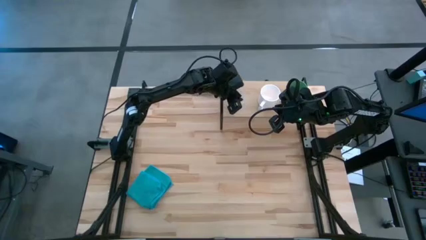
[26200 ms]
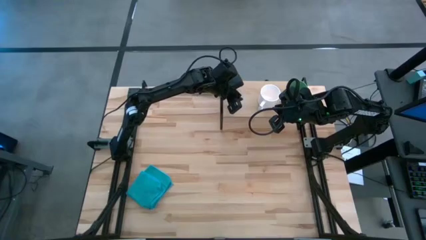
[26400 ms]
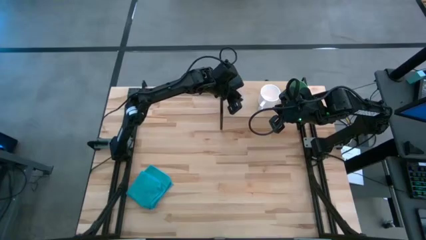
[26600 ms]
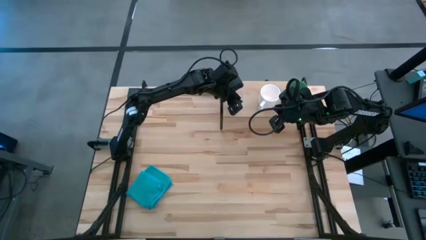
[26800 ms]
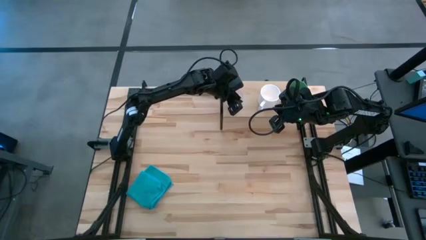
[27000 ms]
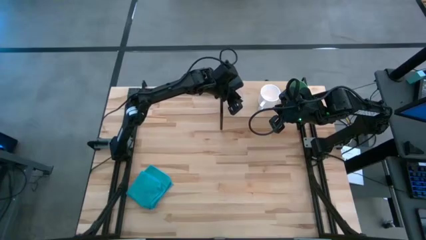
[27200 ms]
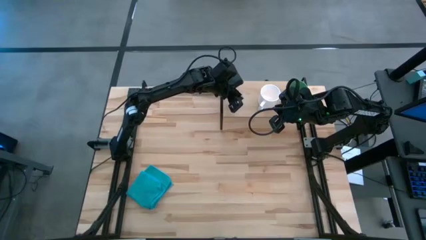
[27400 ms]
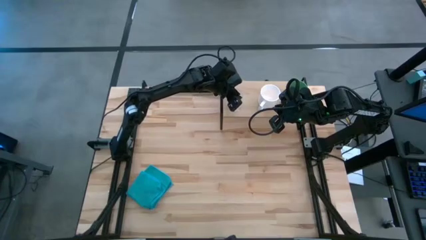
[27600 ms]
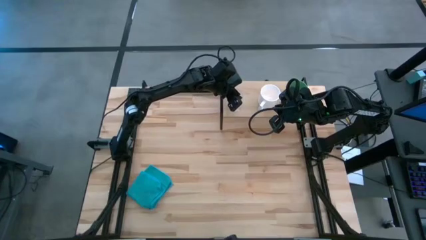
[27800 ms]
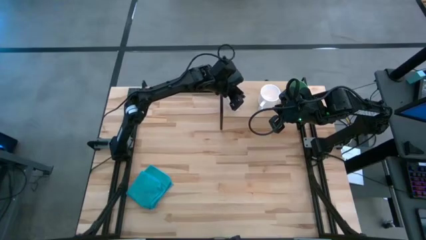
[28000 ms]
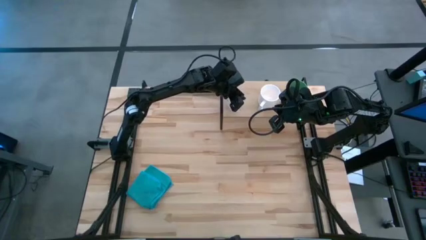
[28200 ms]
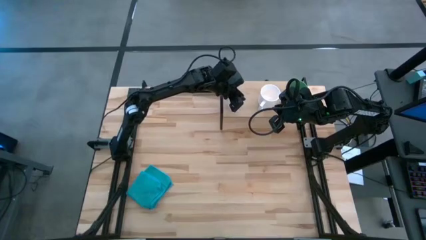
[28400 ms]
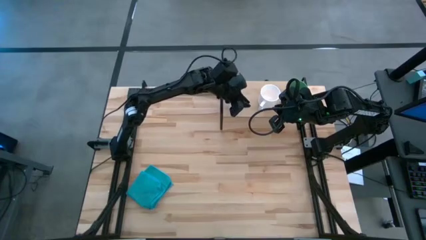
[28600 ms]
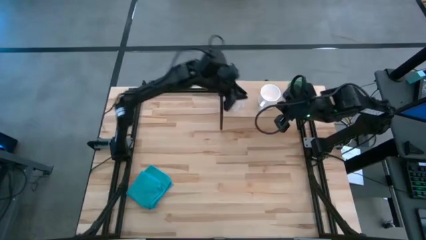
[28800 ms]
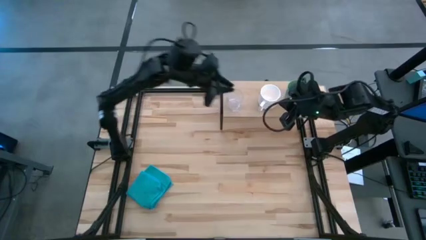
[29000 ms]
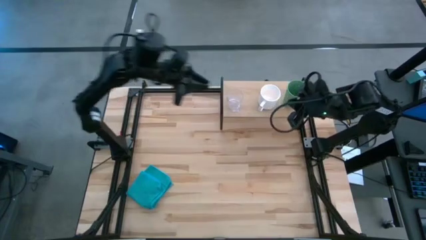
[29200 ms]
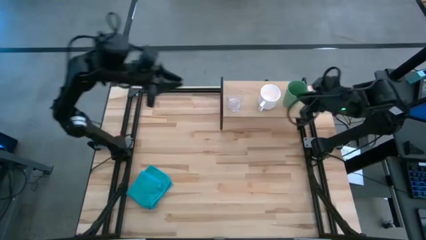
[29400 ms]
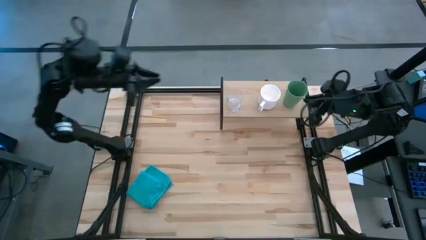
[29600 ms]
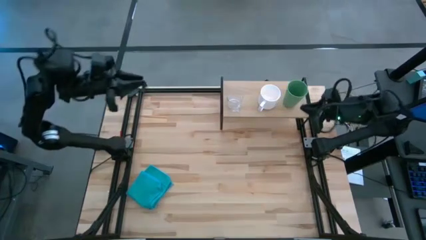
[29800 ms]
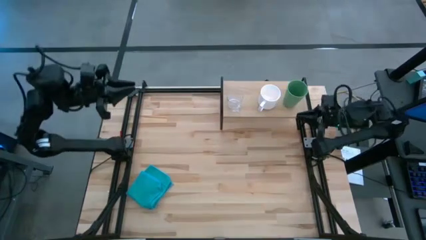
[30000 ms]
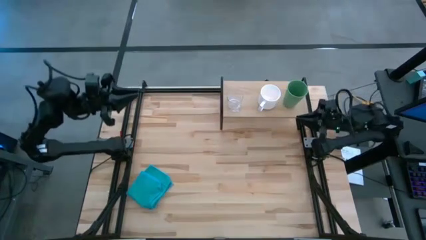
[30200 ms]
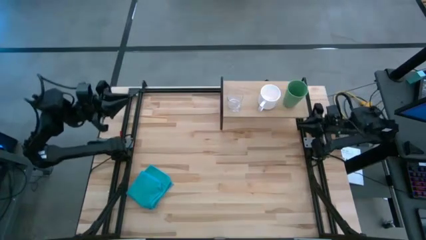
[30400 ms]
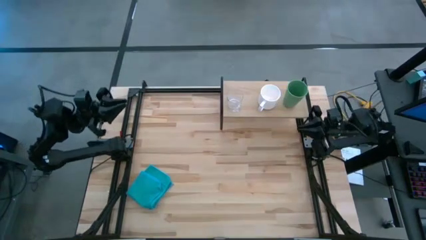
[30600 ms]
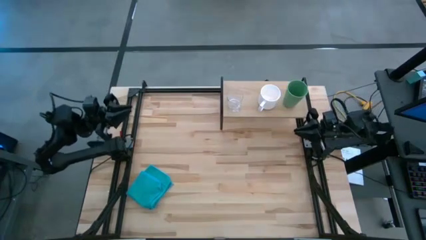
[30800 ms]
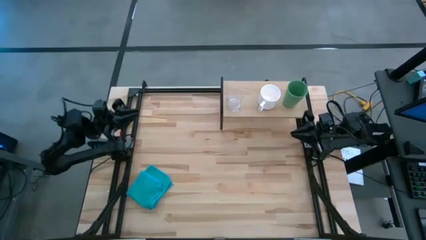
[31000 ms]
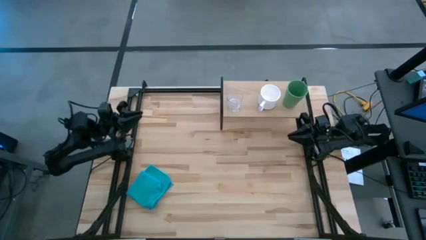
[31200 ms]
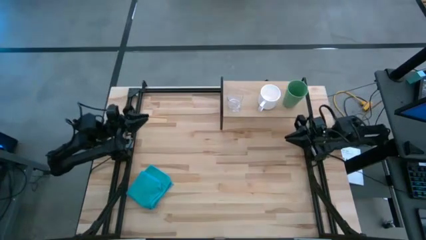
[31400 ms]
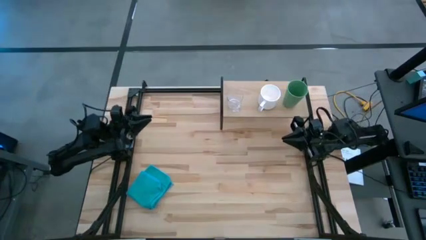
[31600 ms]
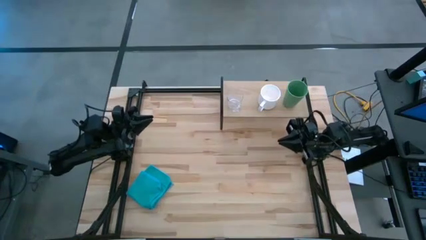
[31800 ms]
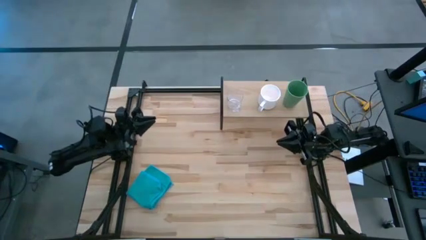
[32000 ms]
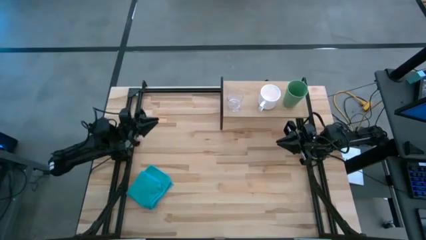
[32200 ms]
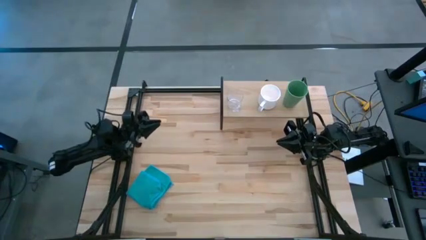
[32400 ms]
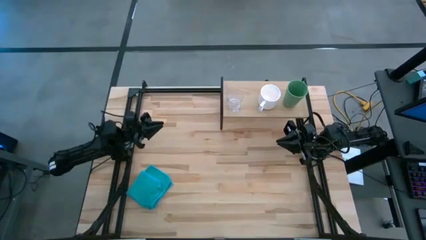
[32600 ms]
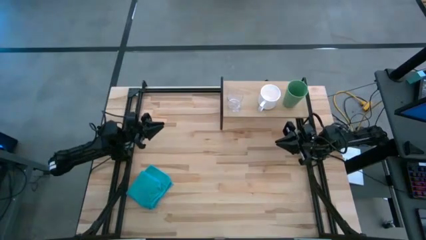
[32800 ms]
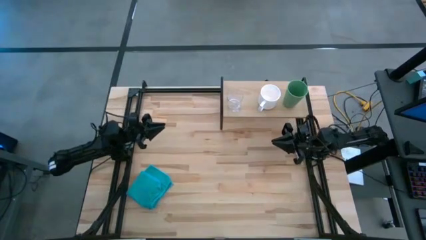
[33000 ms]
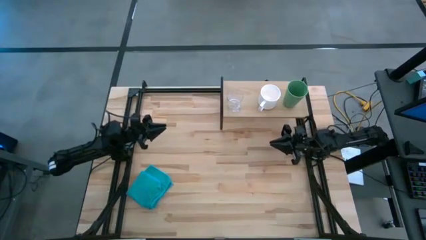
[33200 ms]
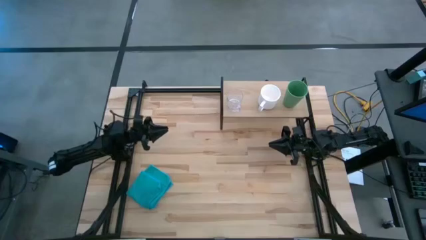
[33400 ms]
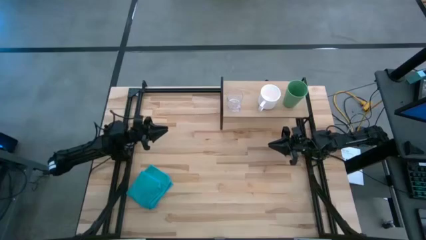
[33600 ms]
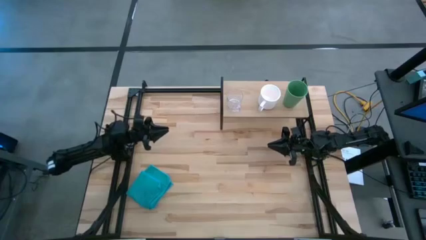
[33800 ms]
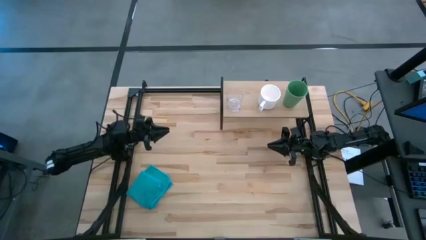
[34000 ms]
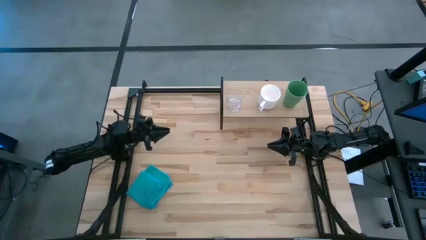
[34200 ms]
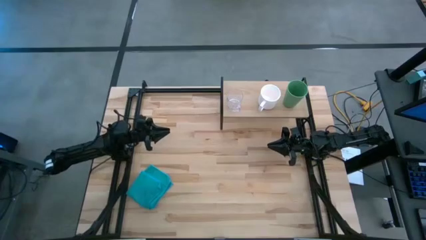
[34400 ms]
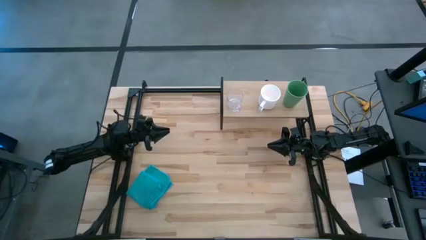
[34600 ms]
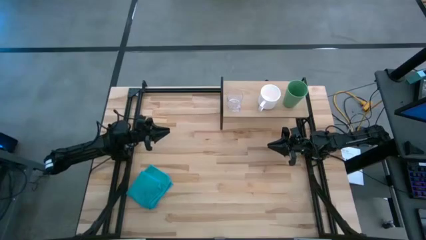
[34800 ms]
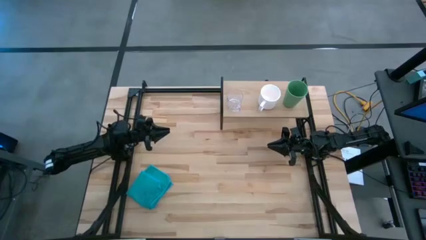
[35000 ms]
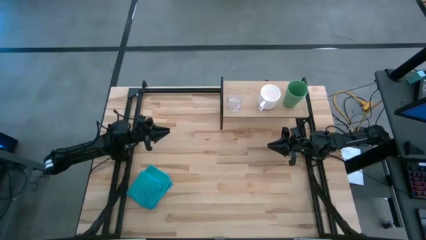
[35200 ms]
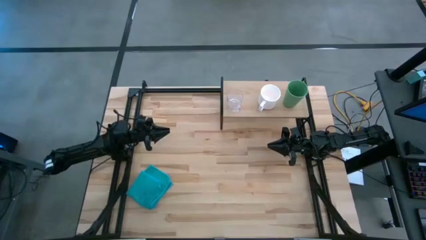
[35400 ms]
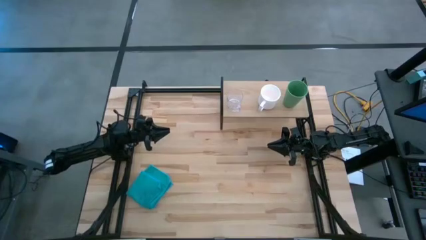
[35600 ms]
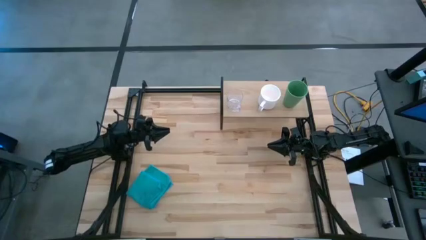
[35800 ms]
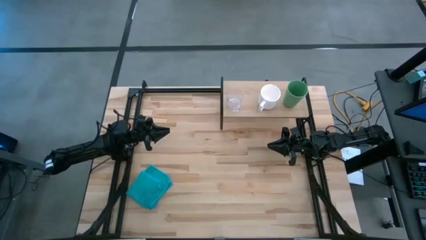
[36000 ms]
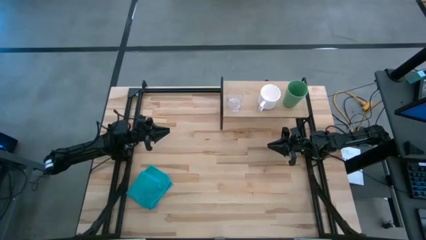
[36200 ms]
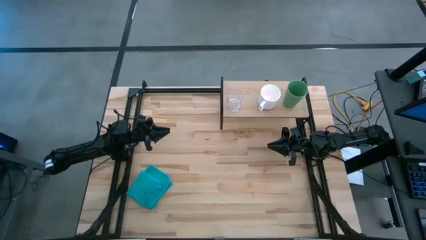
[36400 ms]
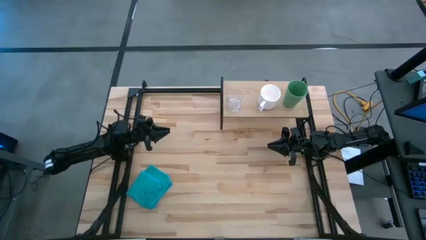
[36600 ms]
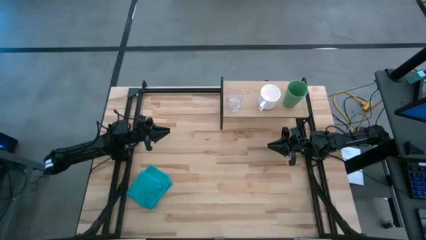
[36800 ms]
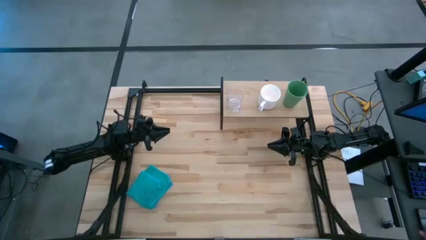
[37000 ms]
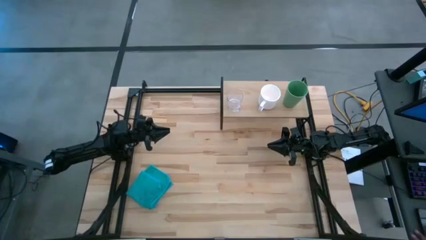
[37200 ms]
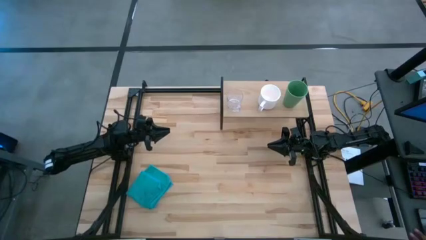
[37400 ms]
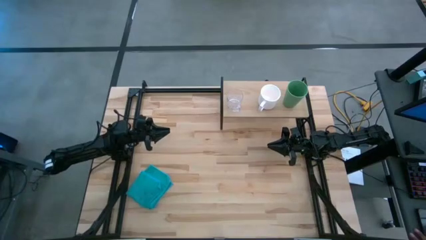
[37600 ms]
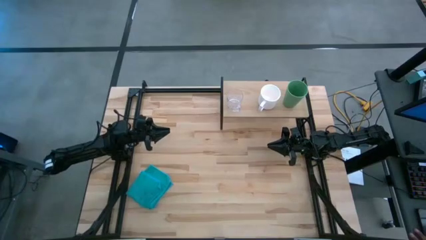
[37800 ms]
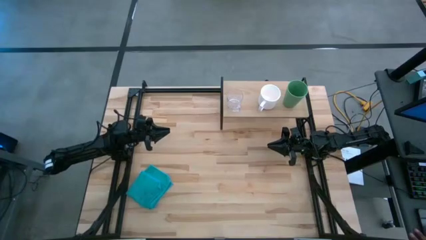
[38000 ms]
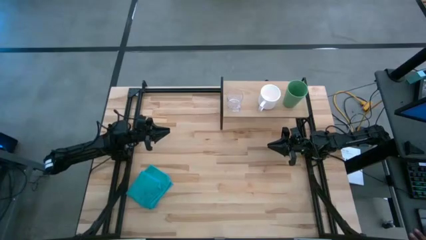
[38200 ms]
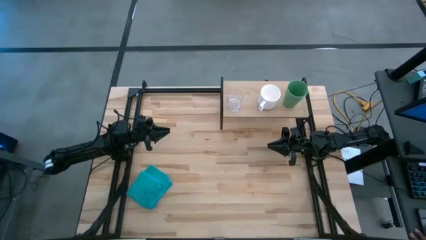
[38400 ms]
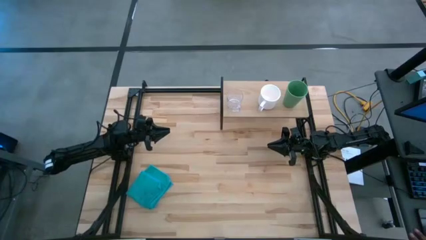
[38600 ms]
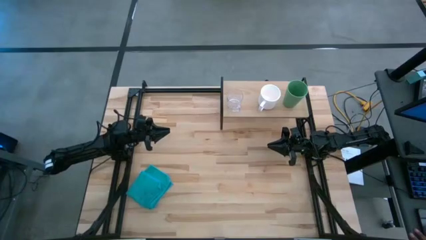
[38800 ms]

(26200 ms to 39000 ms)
Task: Stack small to large cups/mugs on shelf
Return to Home Position

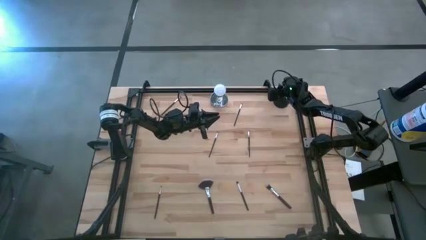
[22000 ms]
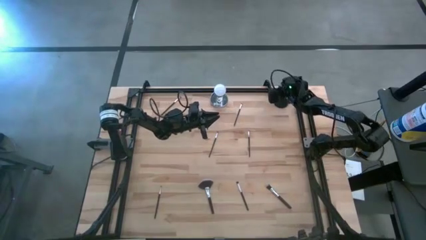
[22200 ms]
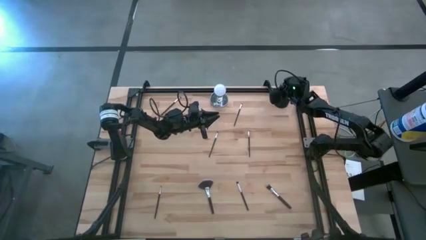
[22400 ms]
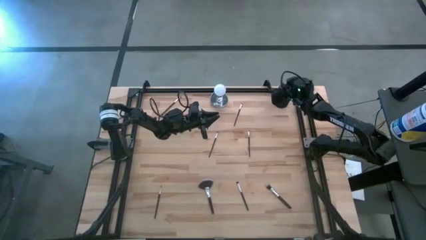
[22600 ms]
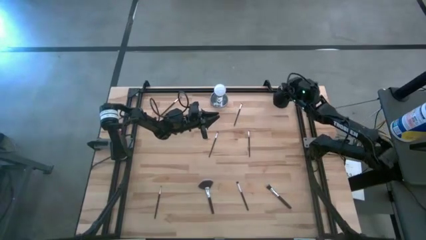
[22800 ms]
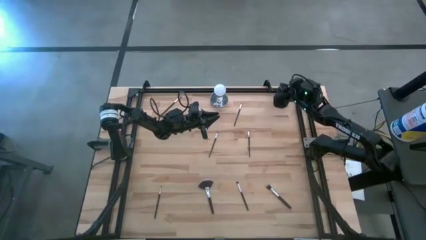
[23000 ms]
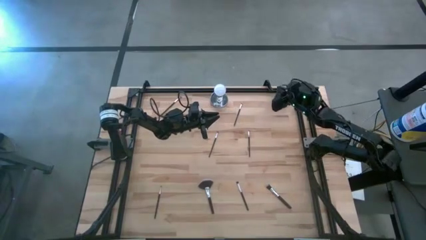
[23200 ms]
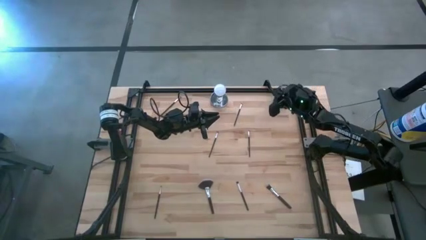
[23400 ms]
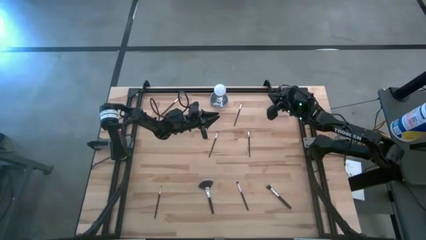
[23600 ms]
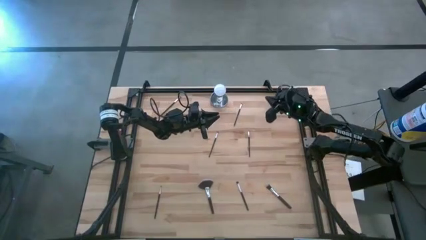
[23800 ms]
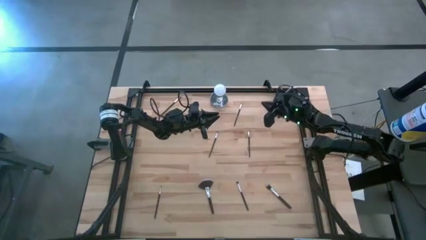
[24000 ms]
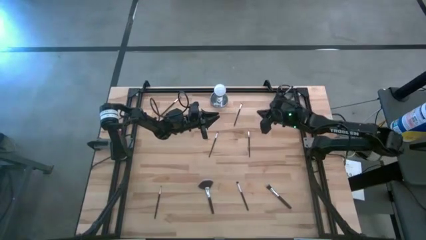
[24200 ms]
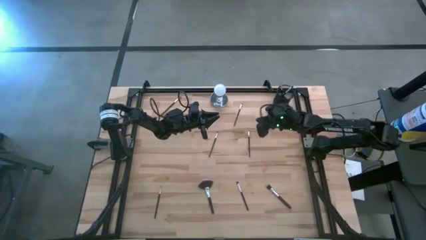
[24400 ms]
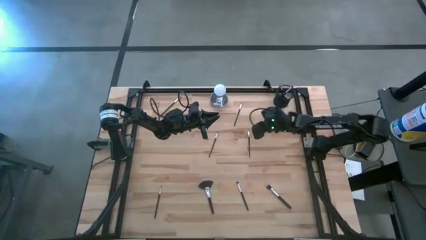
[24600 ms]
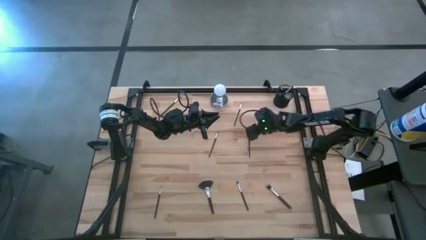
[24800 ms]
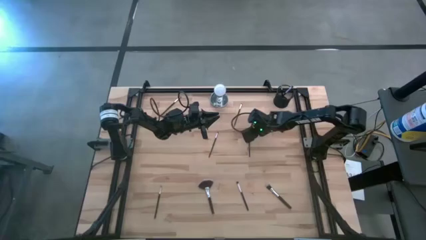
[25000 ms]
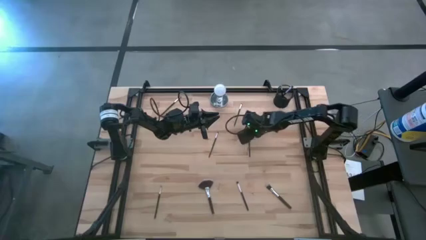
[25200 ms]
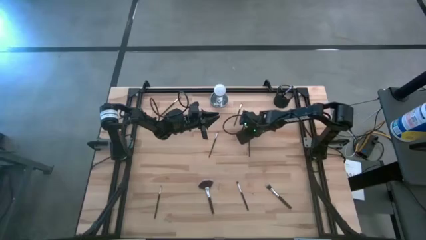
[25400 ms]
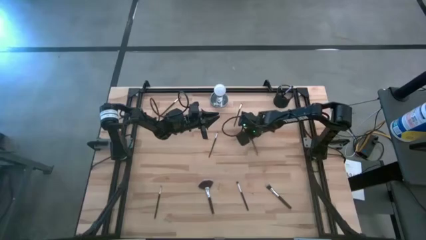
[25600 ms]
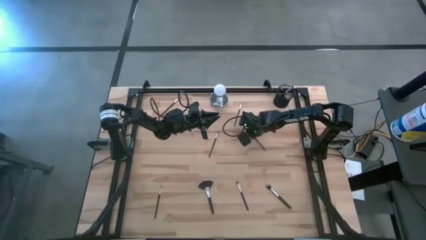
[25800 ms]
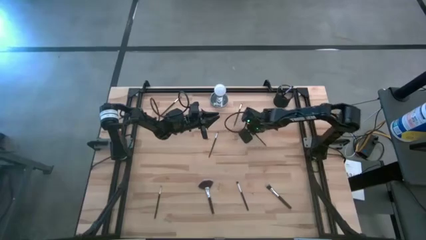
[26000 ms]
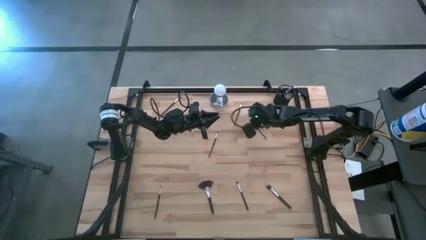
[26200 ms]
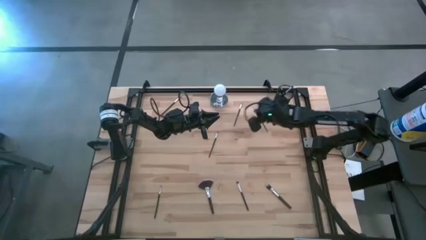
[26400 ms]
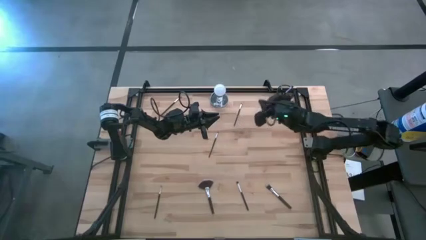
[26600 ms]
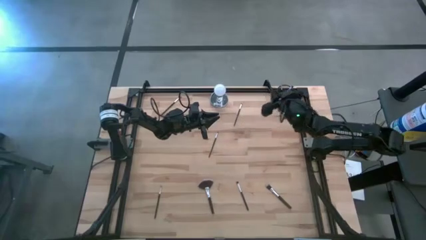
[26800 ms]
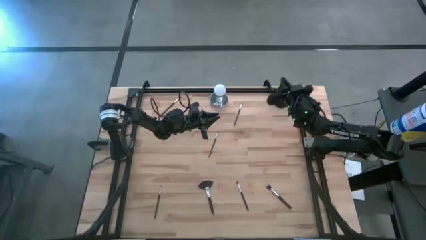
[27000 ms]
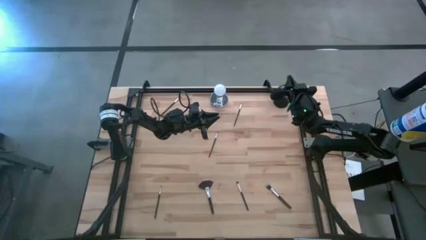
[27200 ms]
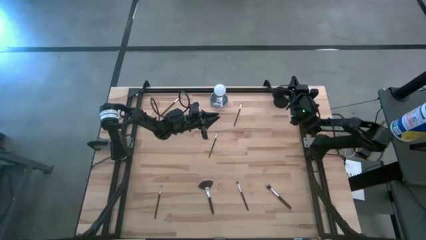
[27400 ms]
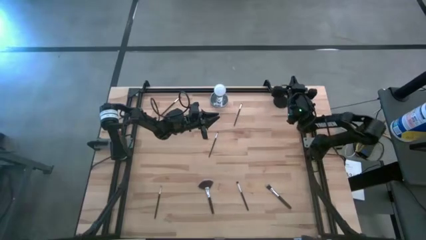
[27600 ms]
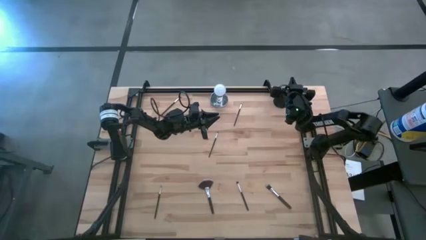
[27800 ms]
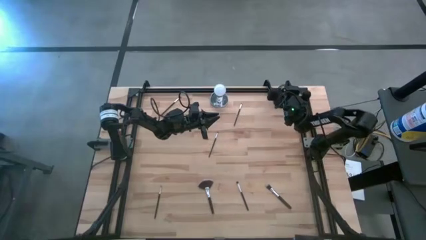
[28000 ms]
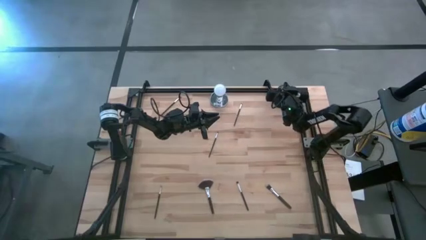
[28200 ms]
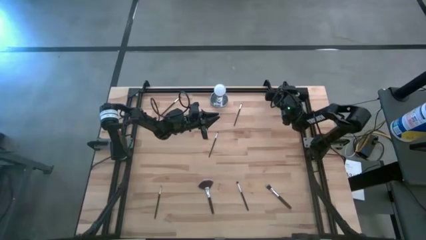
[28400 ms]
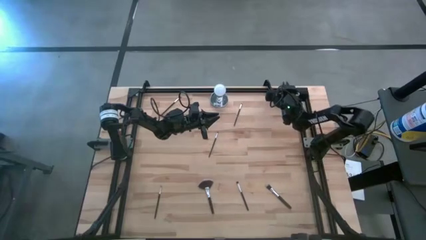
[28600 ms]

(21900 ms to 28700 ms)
Task: Pick & Place Makeup Supplies
Put the makeup brush into the makeup holder
